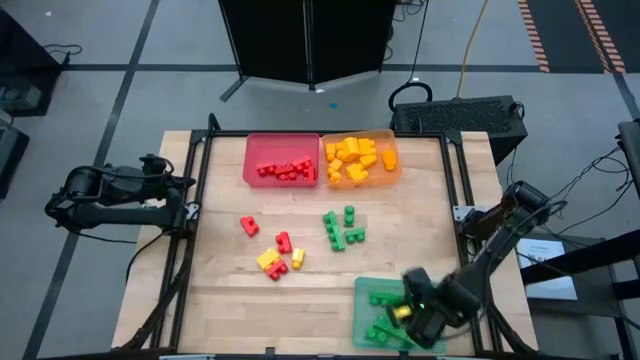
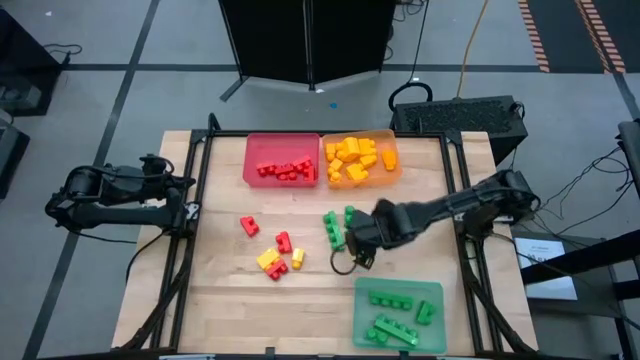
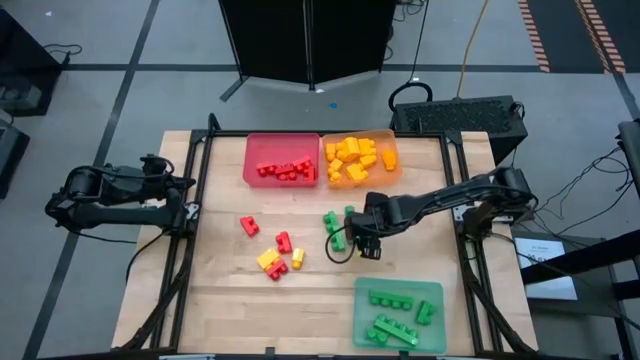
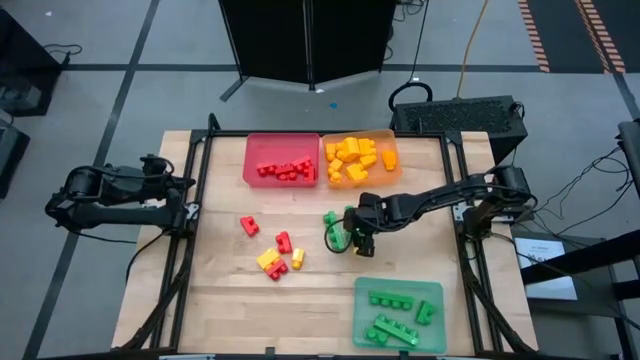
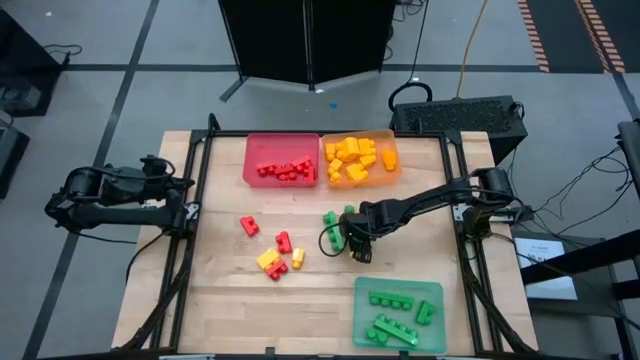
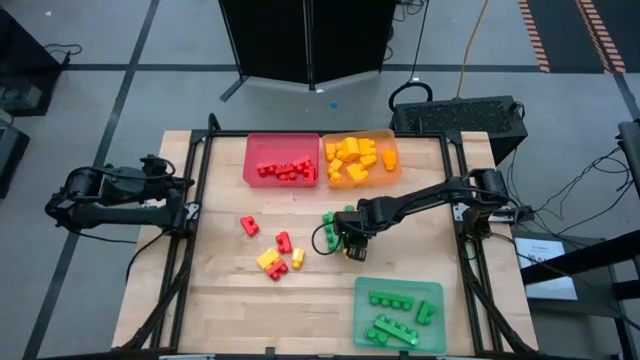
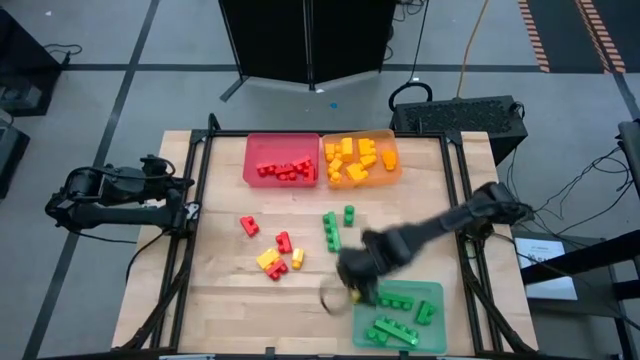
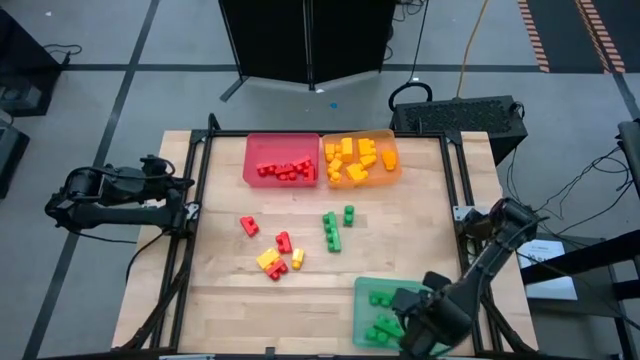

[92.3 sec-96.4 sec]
Task: Sort blocks
Put the green game piece into the green bin

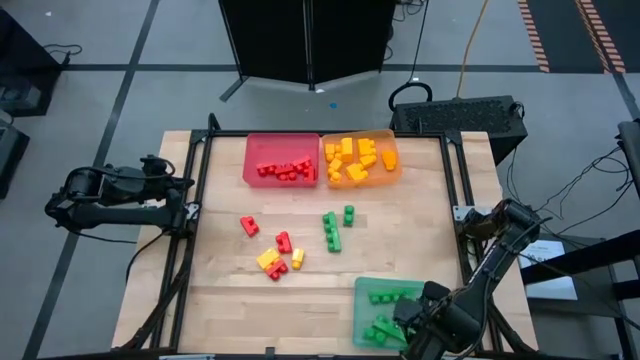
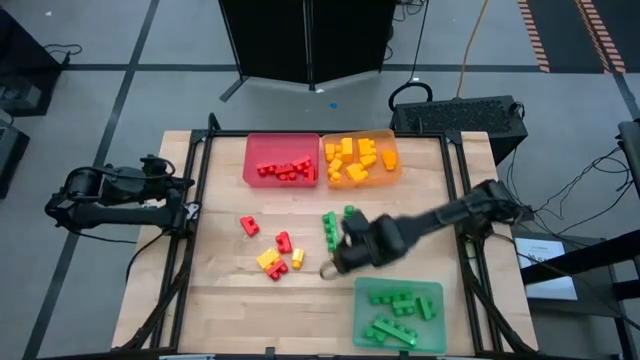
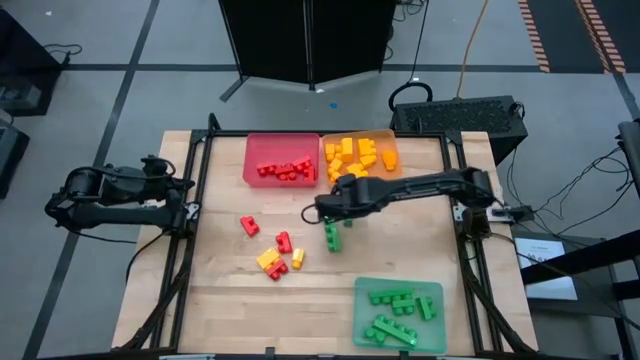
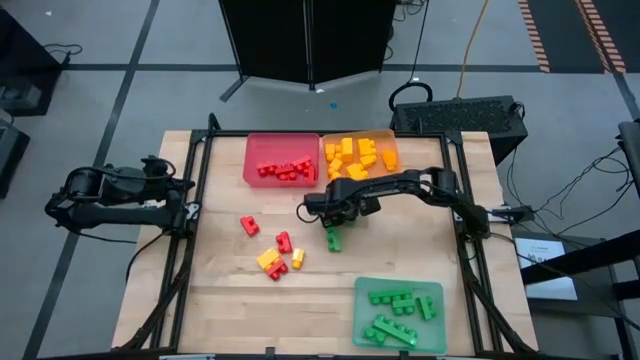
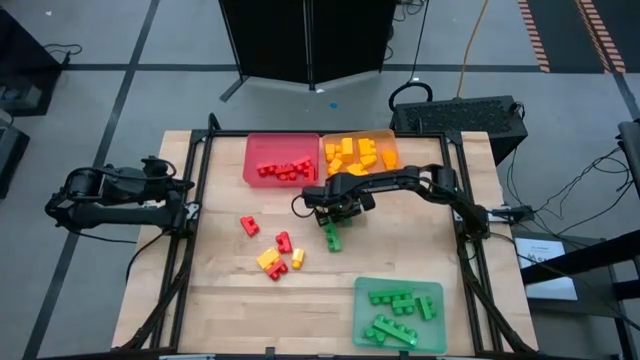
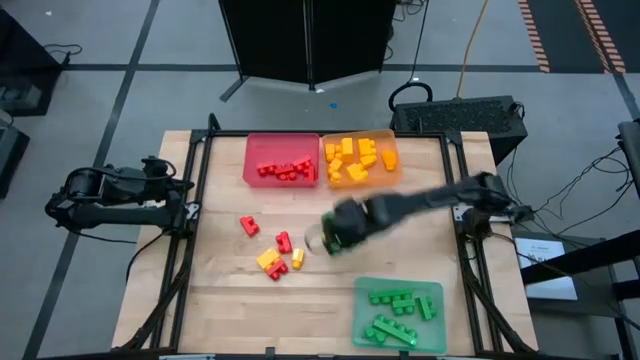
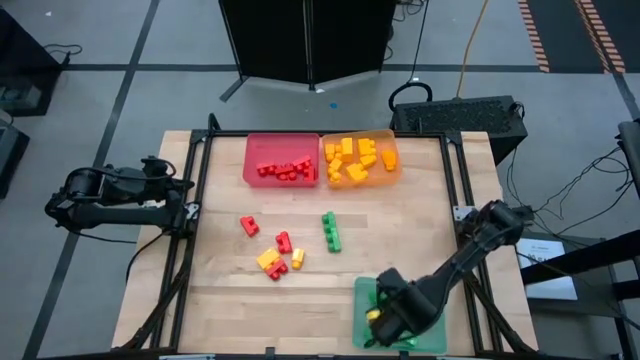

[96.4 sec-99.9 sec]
Put the green game piece into the green bin

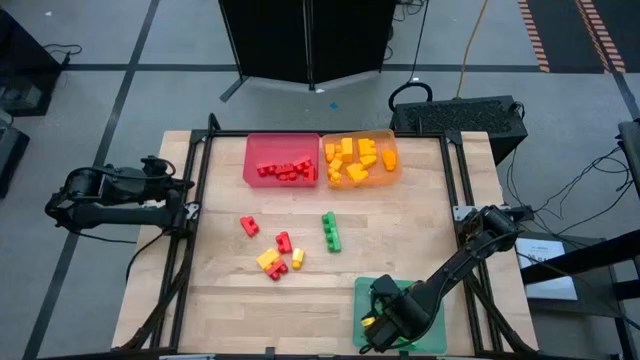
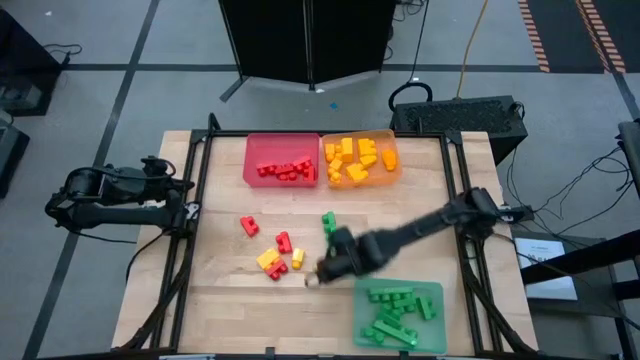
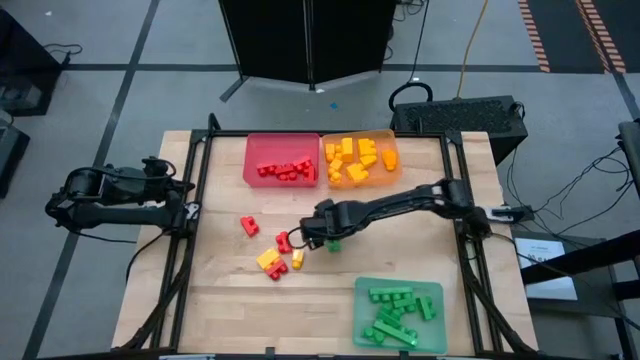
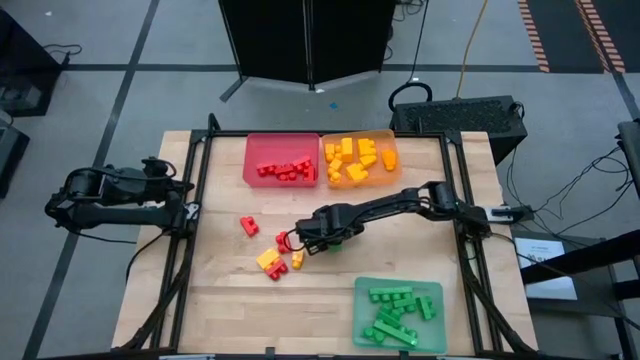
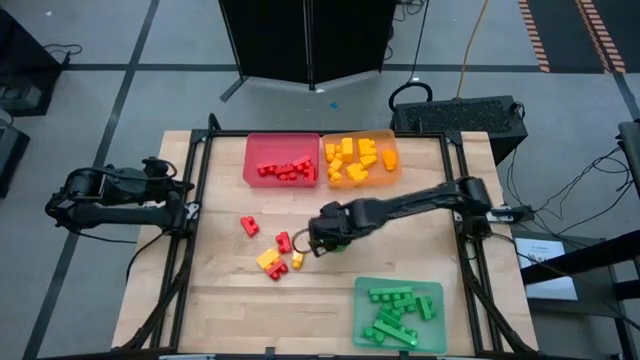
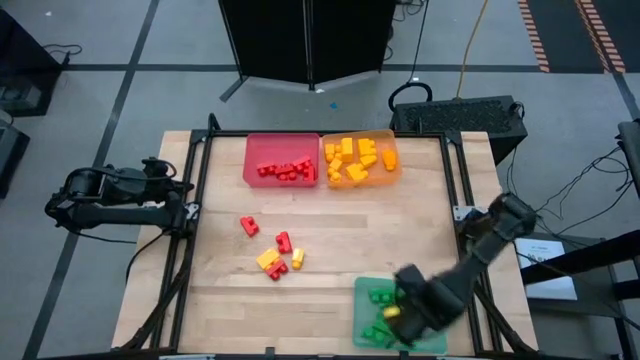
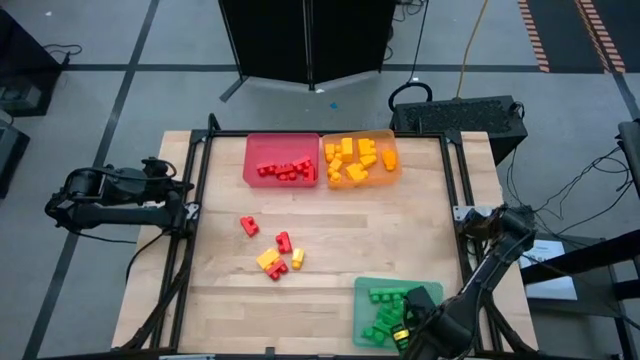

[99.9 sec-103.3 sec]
Put the green game piece into the green bin

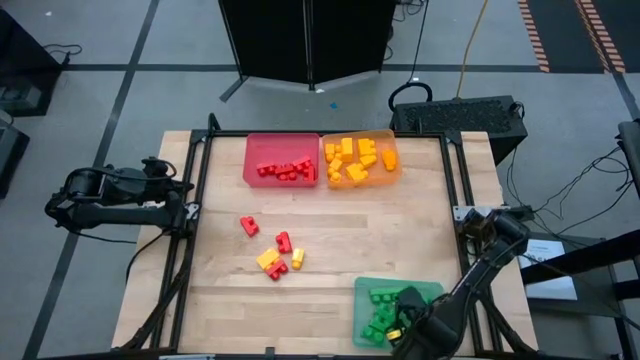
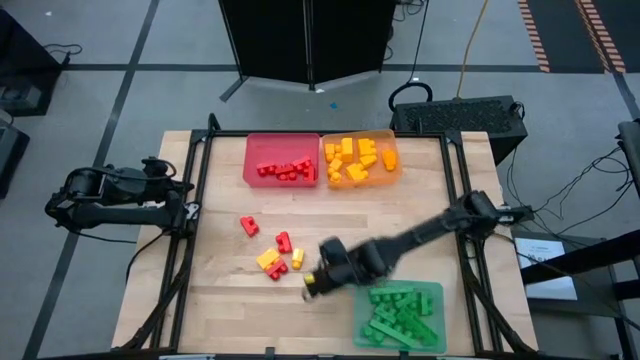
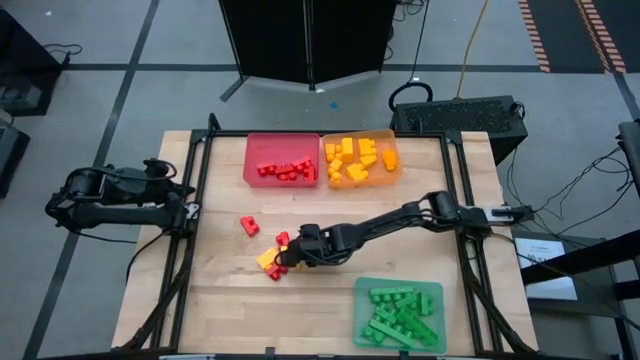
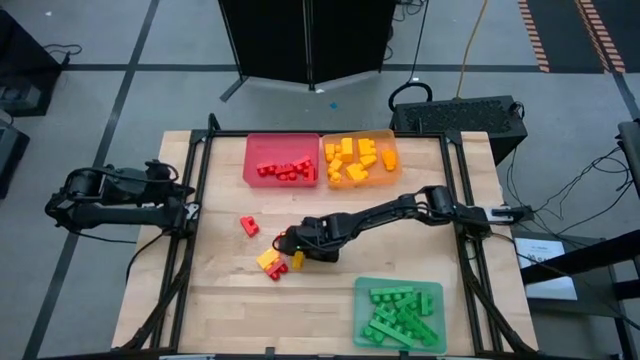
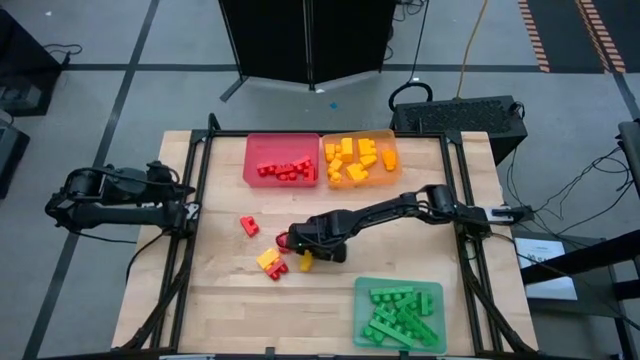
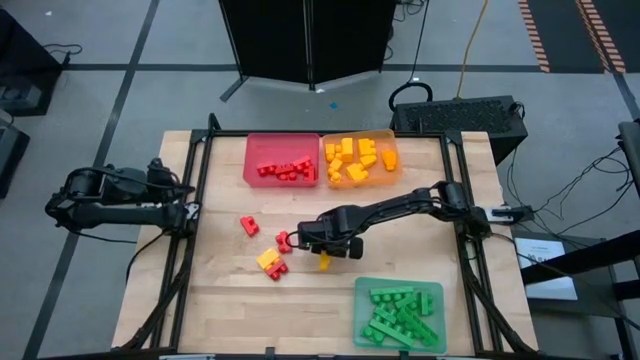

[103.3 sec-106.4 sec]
Put the yellow game piece into the orange bin

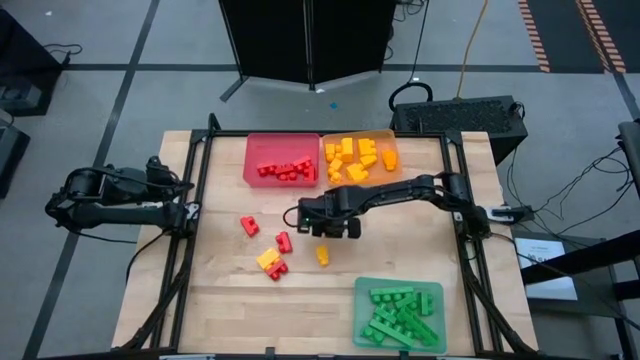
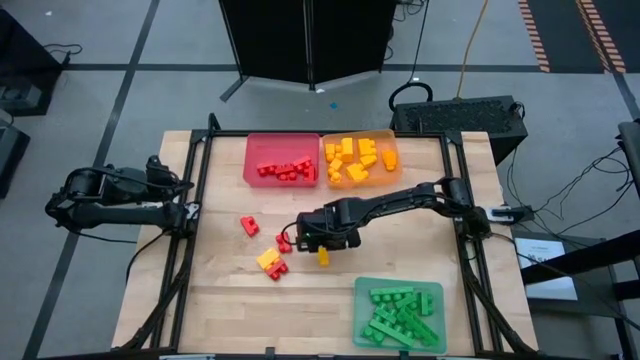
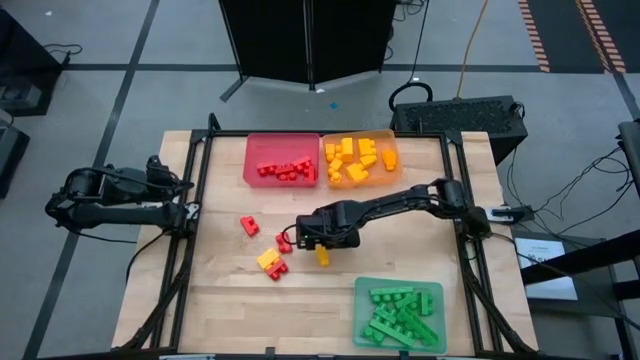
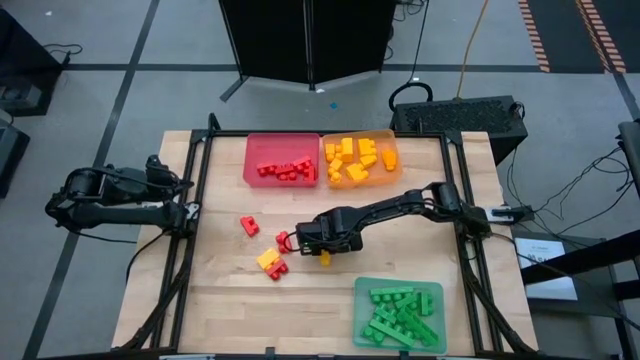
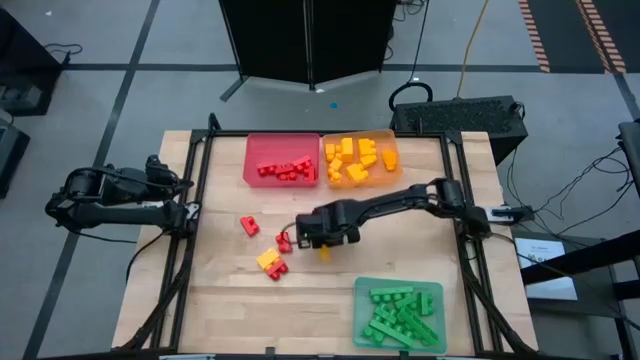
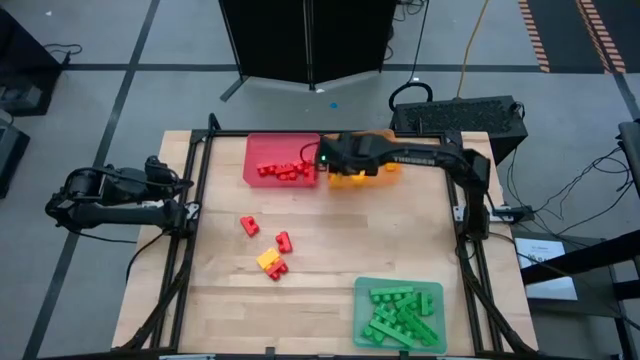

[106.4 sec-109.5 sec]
Put the yellow game piece into the orange bin

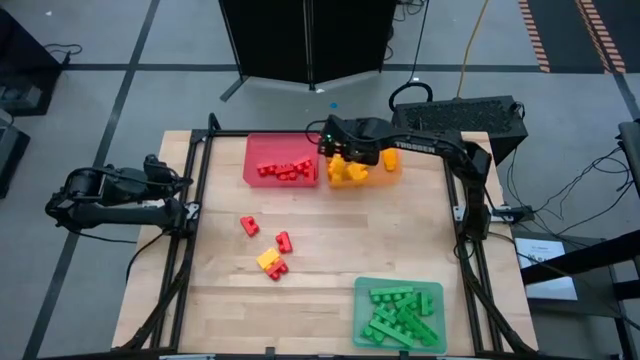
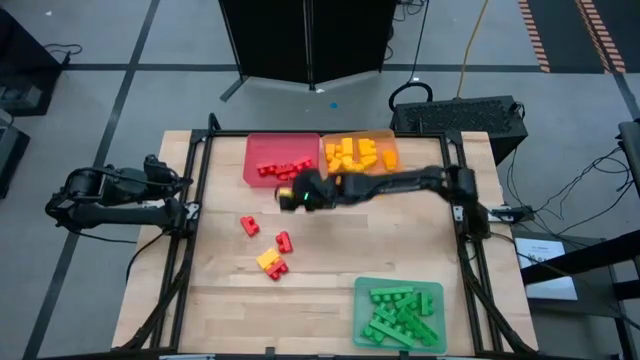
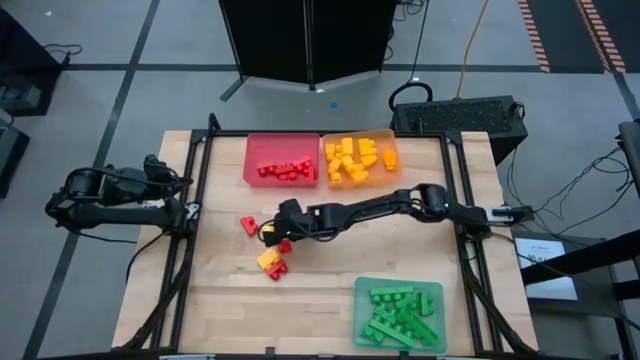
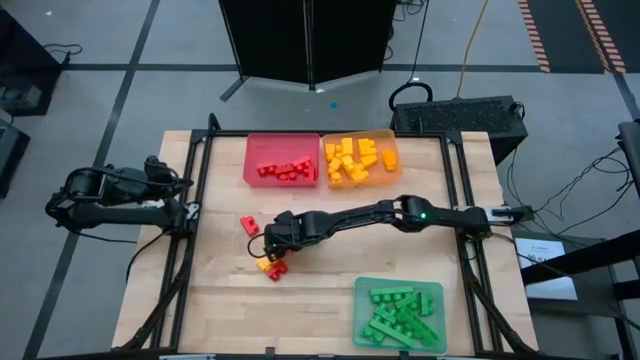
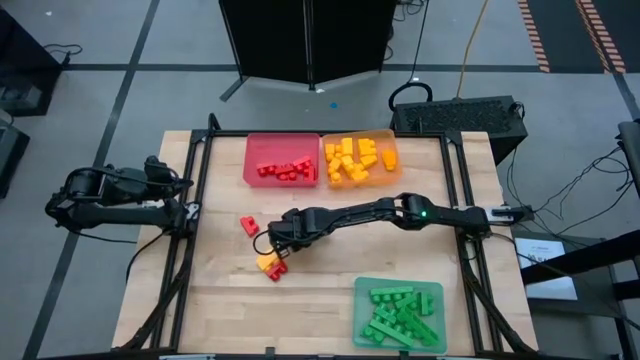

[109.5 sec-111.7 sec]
Put the red game piece into the red bin

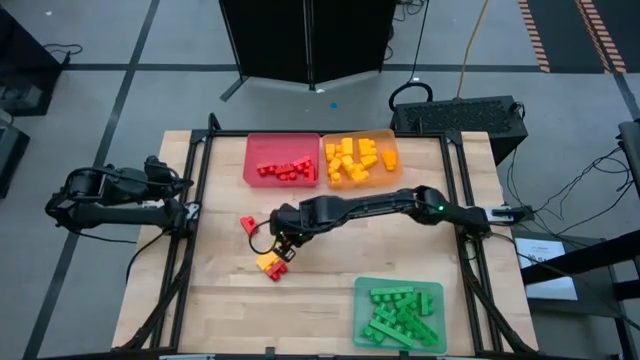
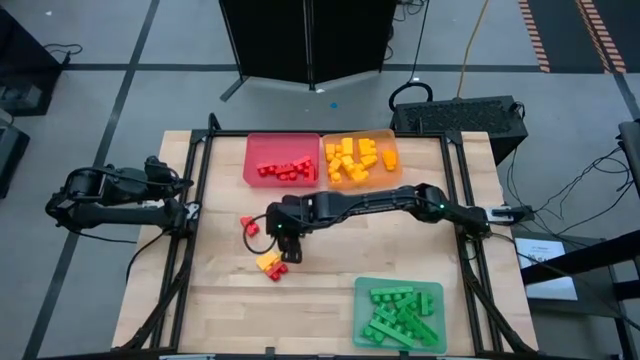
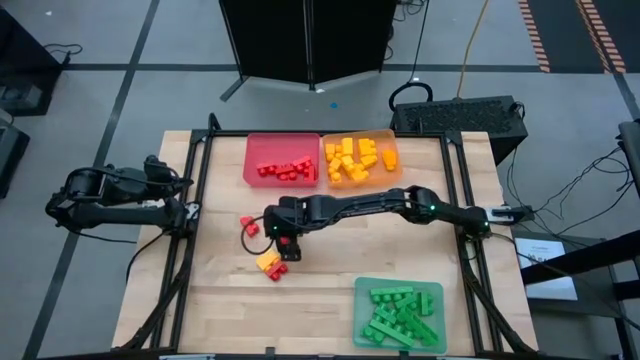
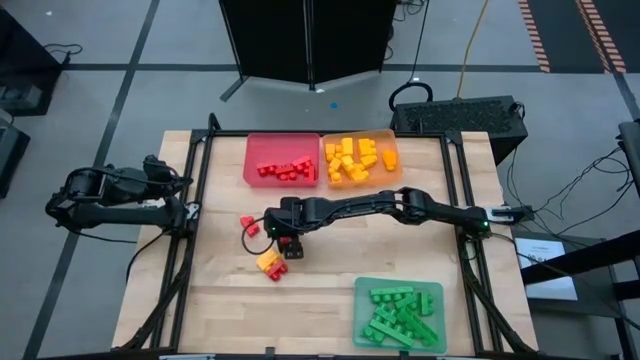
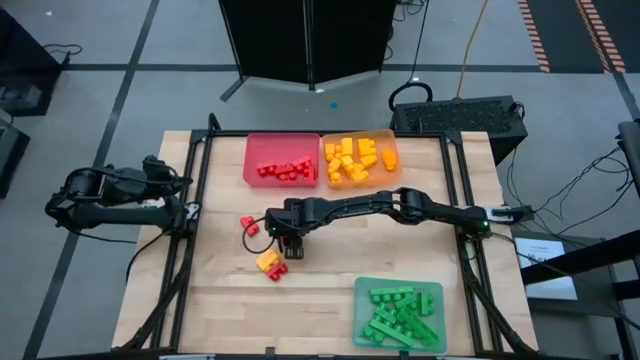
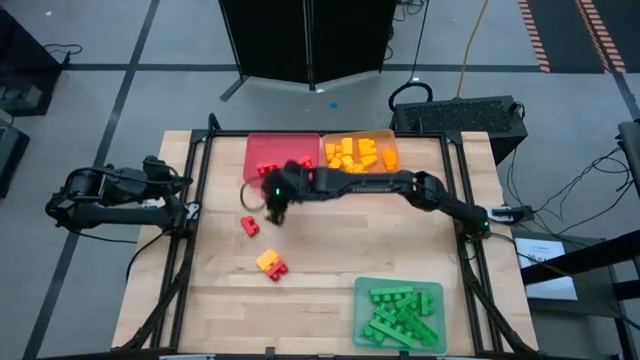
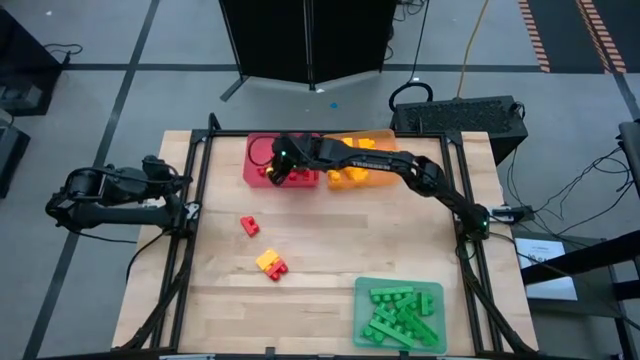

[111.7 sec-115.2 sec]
Put the red game piece into the red bin
